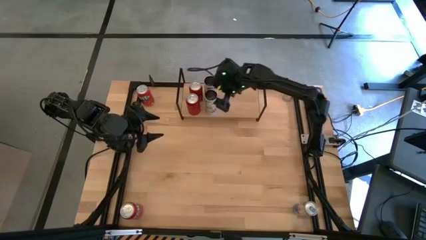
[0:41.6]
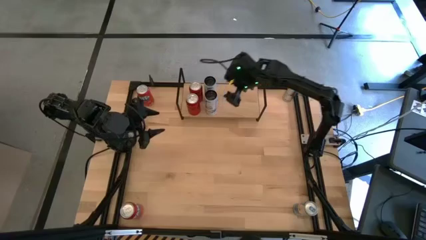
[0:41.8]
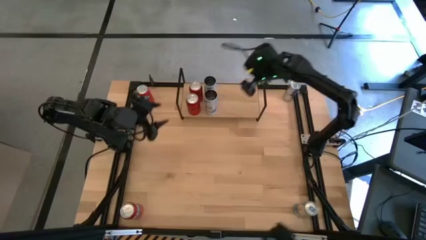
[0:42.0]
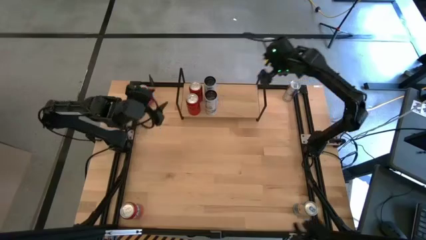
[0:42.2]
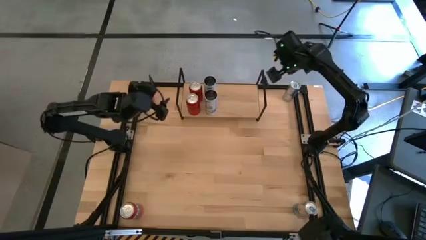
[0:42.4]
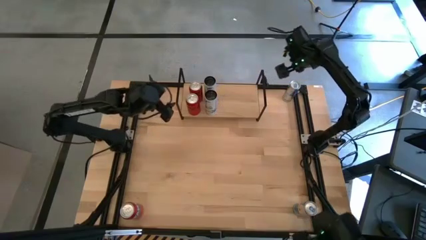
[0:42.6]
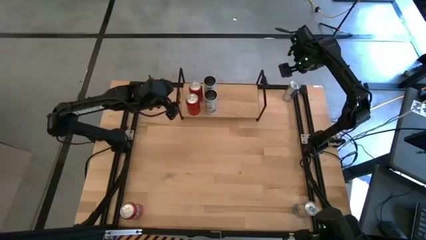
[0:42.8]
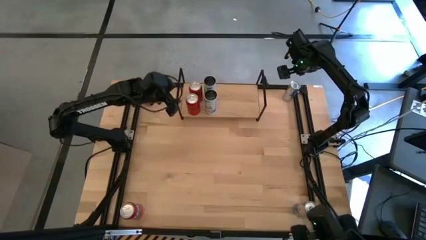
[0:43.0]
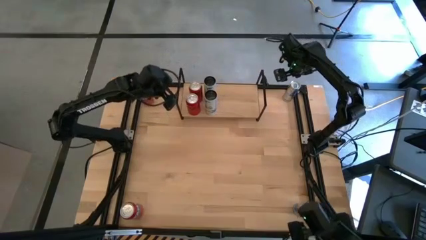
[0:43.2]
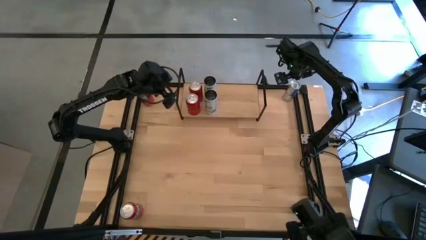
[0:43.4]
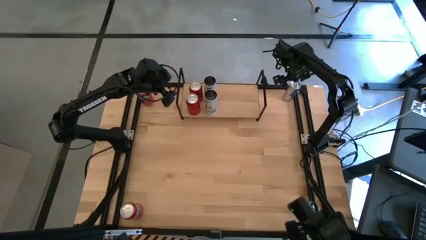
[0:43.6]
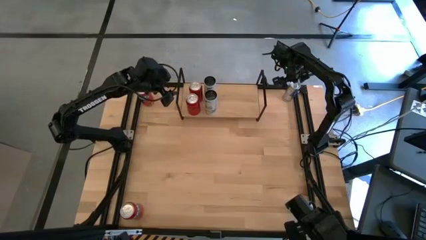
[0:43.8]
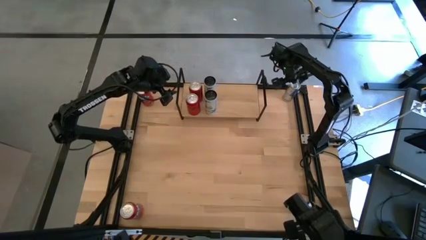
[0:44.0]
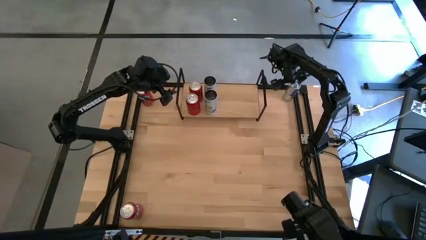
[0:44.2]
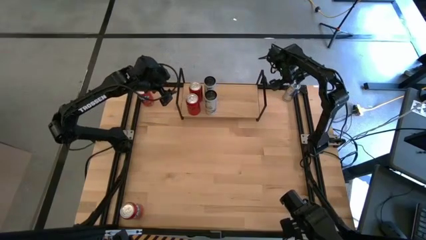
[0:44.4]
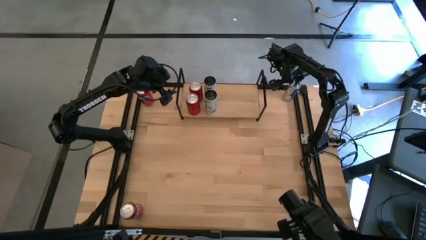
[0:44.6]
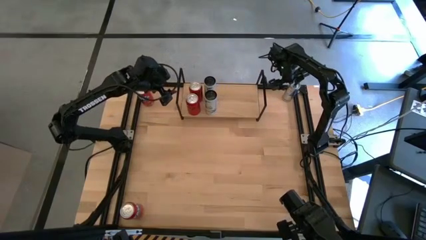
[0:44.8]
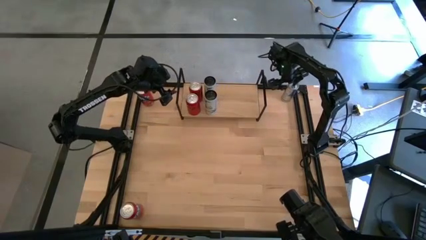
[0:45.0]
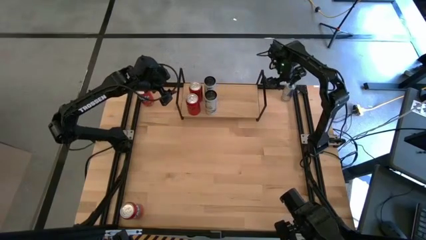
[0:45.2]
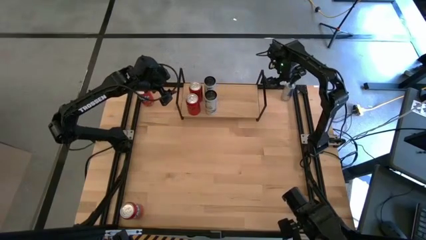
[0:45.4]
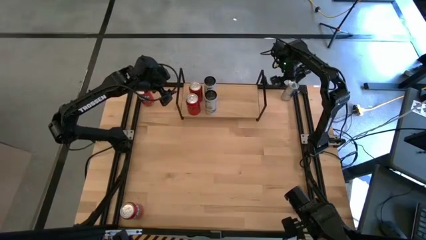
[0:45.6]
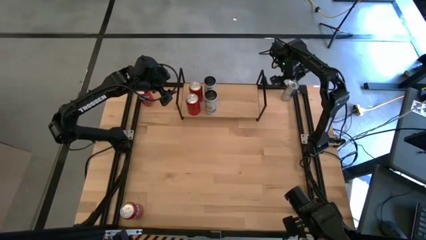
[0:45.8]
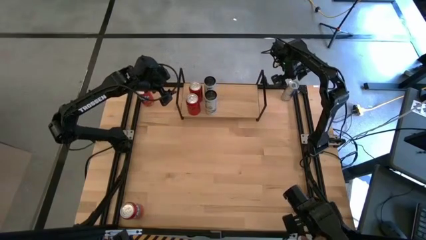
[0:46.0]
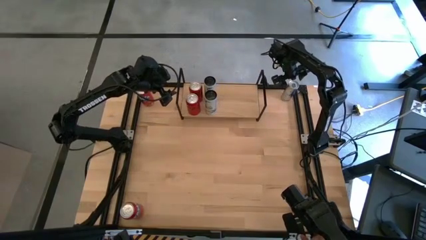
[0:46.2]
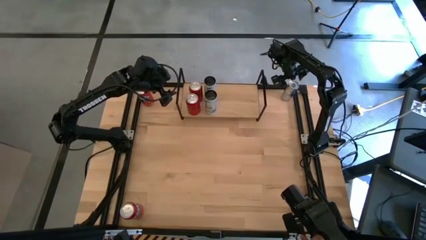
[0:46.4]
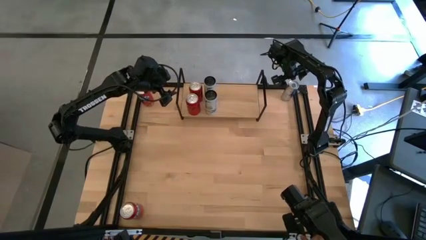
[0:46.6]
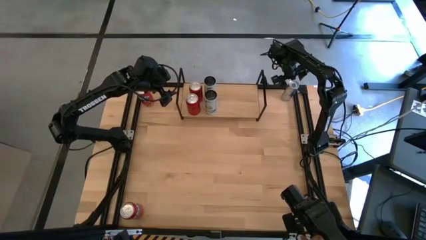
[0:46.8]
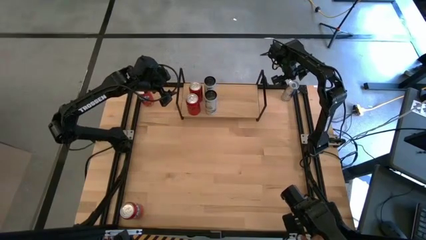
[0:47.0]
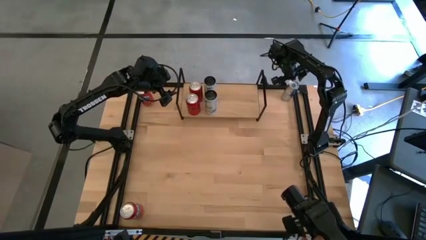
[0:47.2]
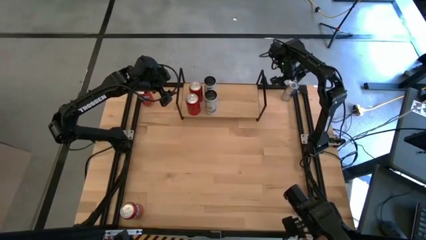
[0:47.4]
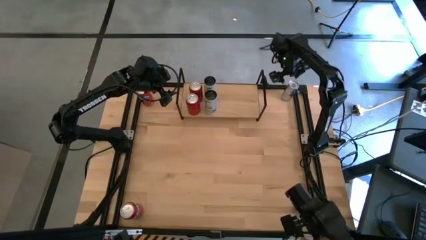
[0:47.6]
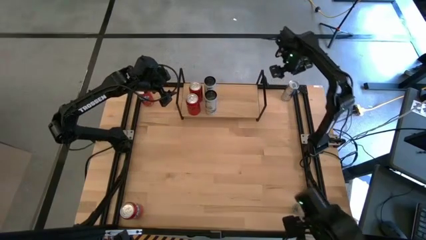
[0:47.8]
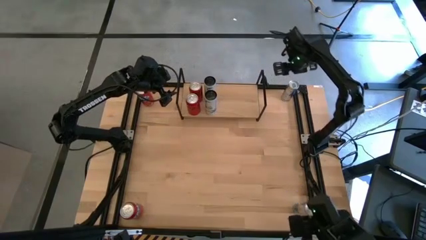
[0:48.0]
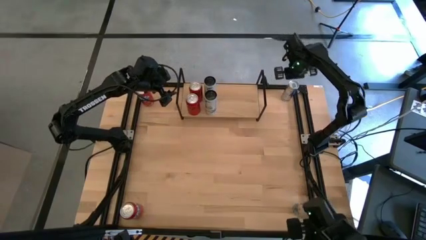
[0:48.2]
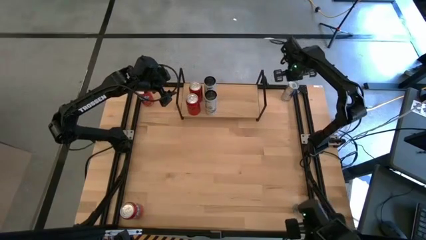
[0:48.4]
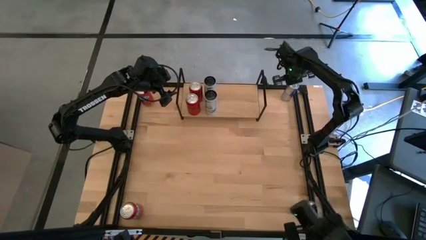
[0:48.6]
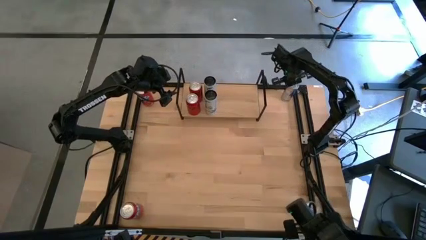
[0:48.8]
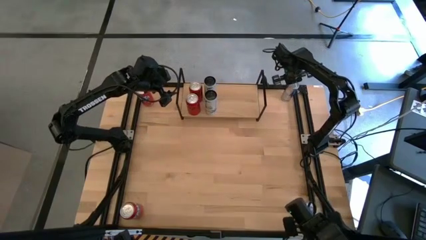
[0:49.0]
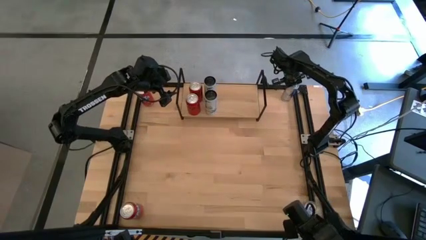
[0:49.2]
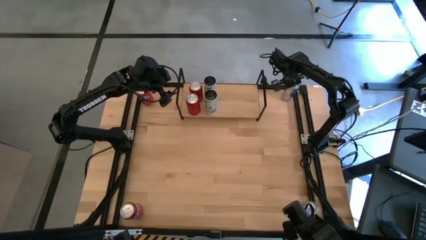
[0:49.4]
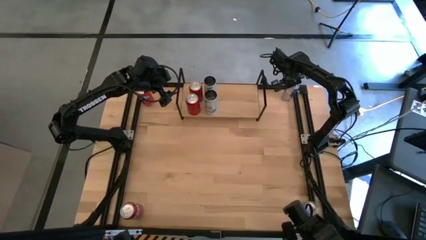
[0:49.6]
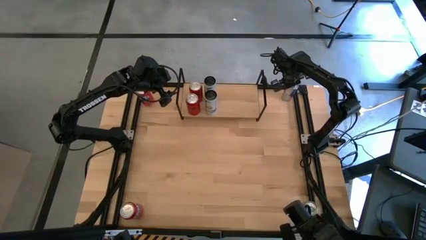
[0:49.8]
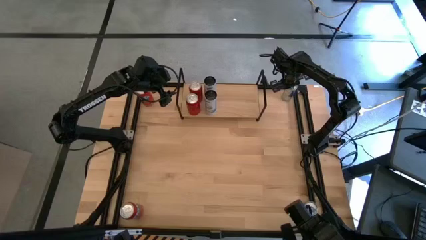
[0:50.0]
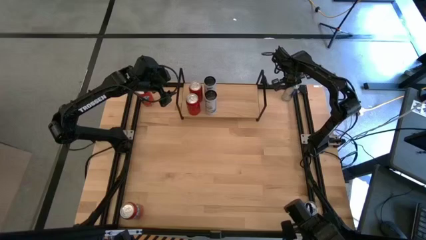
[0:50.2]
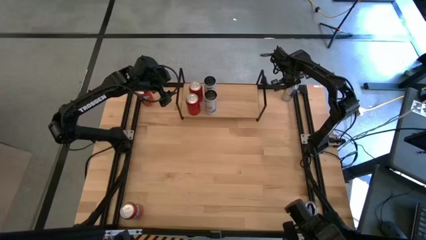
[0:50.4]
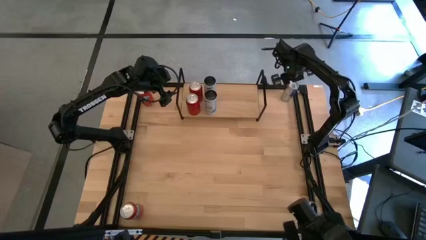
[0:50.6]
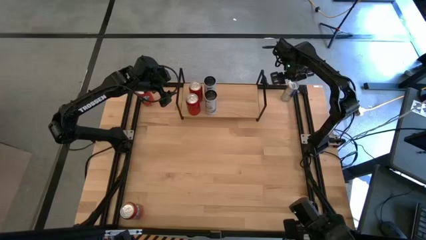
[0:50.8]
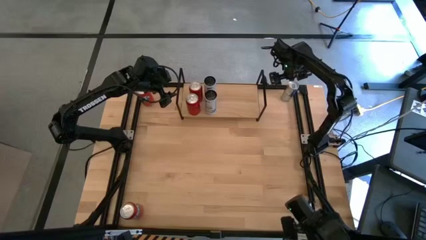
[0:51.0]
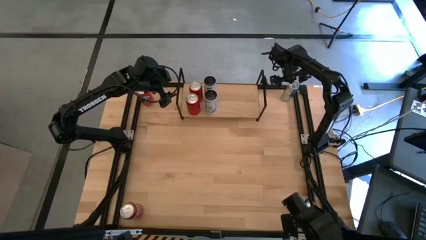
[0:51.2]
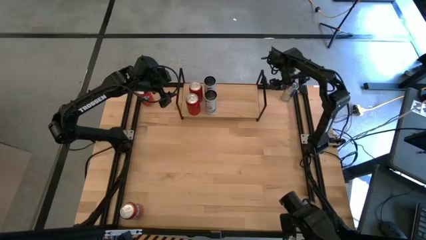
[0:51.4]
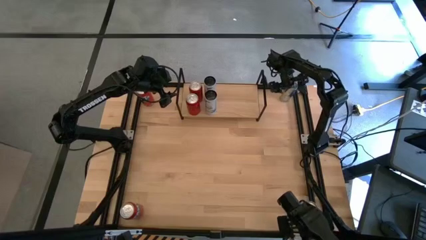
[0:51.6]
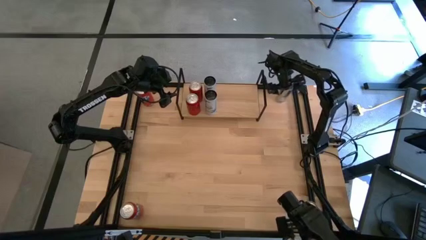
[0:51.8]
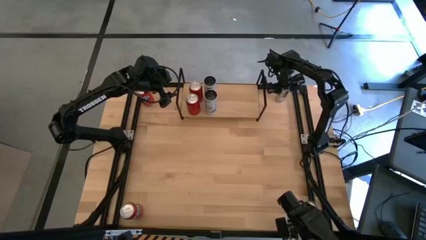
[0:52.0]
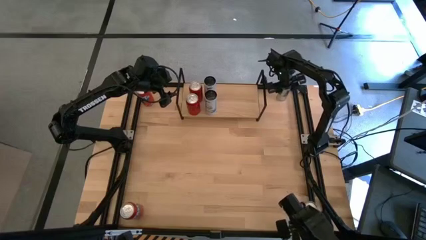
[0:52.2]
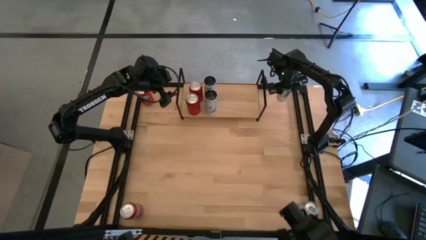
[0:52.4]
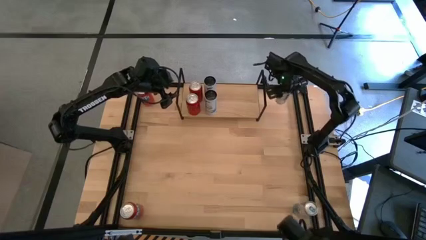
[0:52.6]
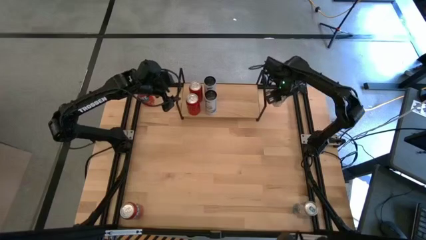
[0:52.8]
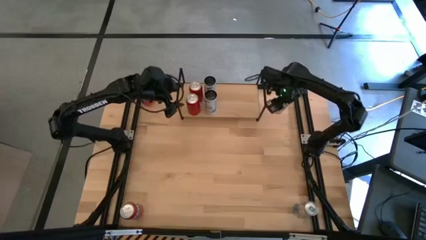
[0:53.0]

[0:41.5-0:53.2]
Task: Place canned beverage on shelf
Put the top blue soda can on the shelf

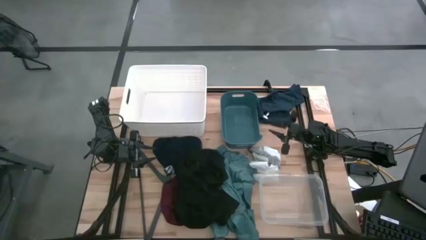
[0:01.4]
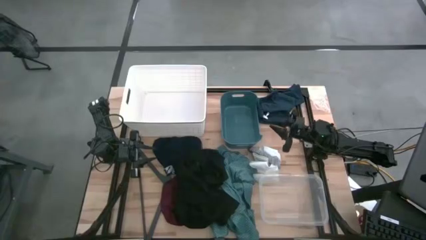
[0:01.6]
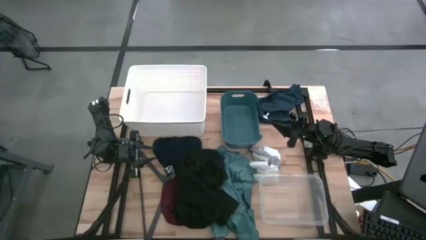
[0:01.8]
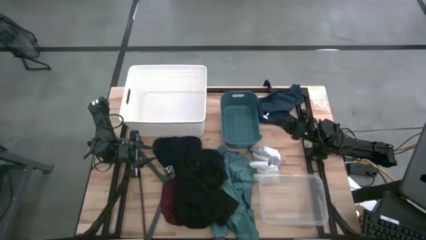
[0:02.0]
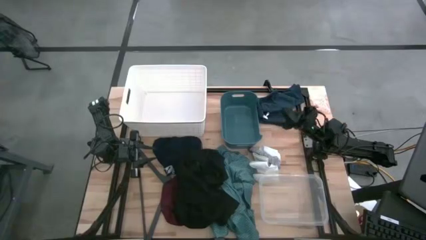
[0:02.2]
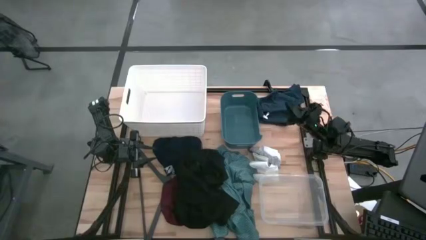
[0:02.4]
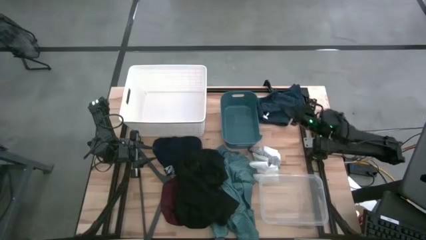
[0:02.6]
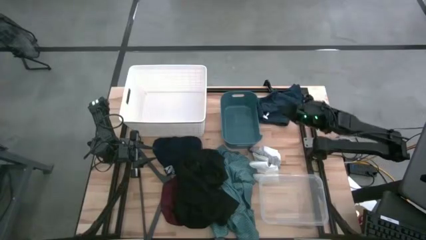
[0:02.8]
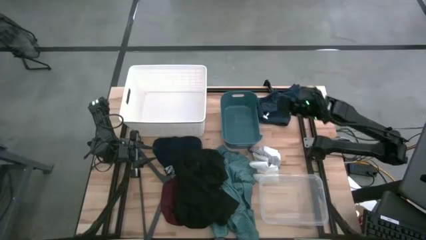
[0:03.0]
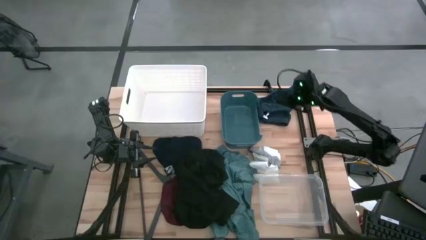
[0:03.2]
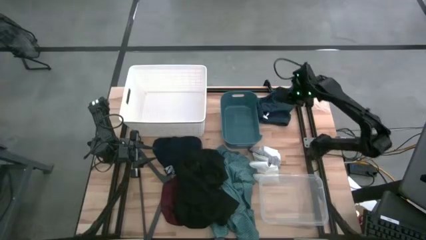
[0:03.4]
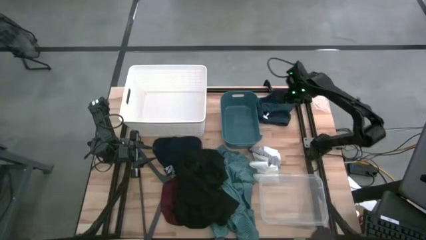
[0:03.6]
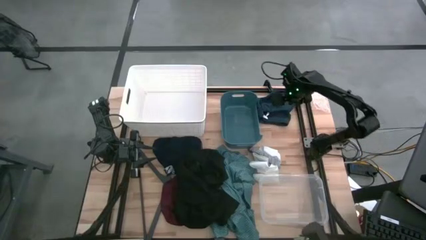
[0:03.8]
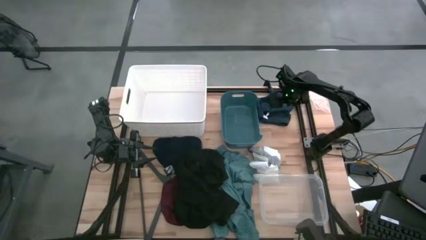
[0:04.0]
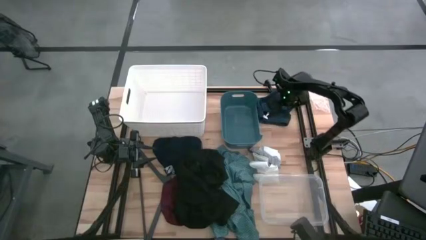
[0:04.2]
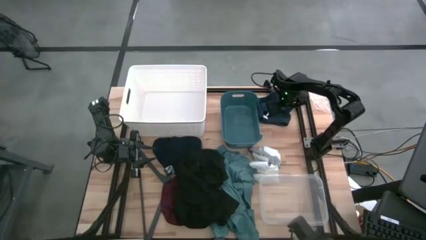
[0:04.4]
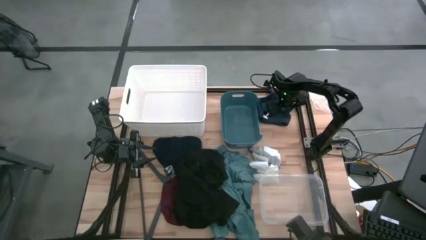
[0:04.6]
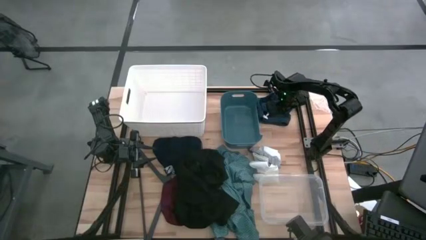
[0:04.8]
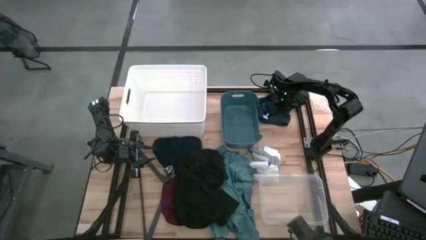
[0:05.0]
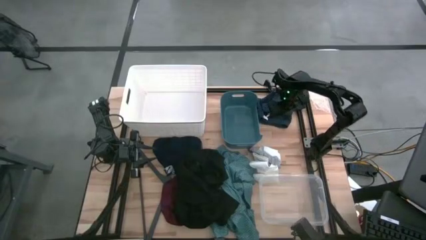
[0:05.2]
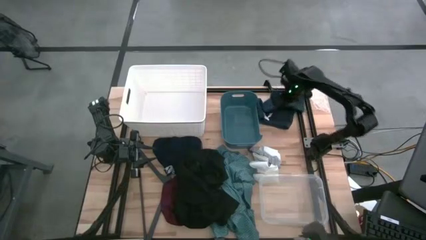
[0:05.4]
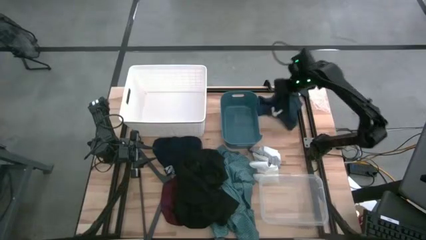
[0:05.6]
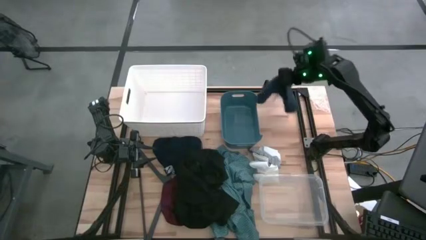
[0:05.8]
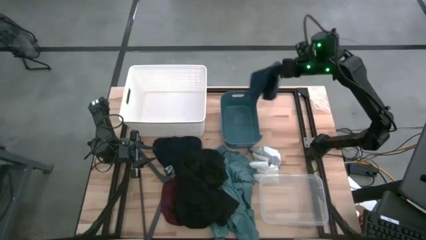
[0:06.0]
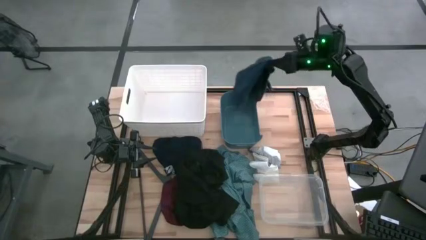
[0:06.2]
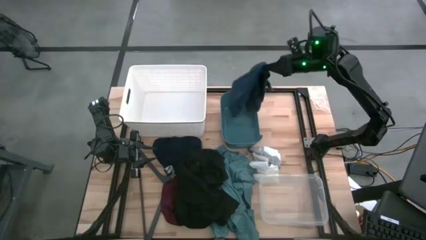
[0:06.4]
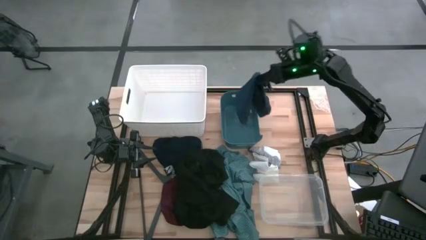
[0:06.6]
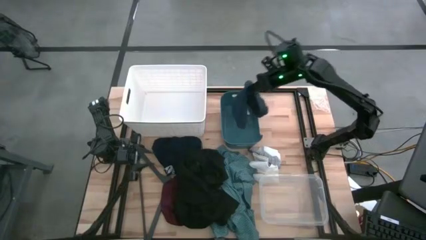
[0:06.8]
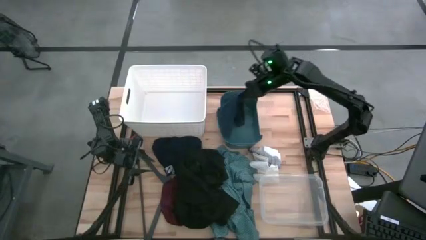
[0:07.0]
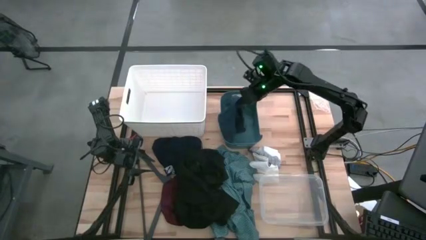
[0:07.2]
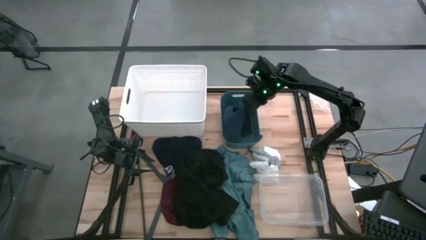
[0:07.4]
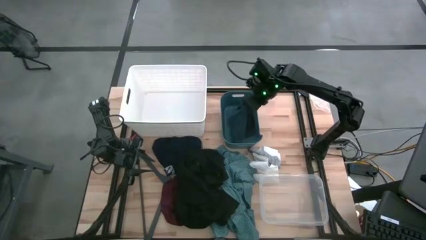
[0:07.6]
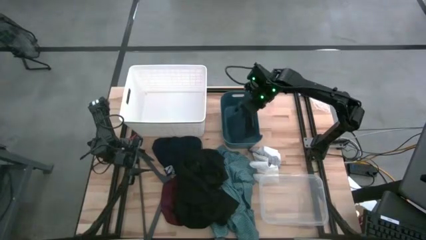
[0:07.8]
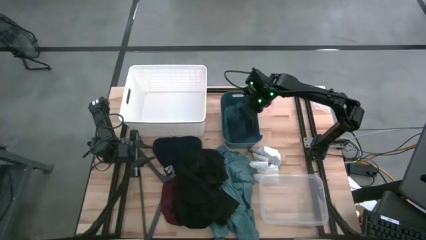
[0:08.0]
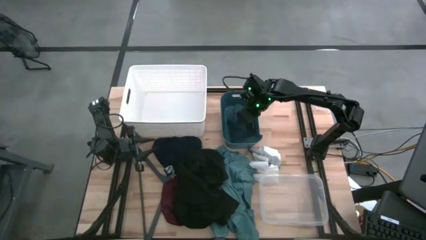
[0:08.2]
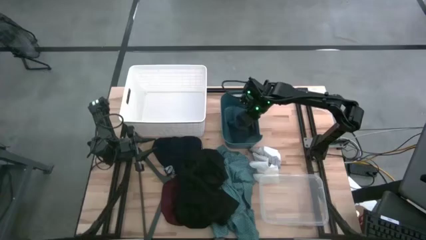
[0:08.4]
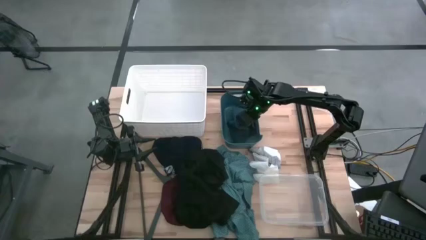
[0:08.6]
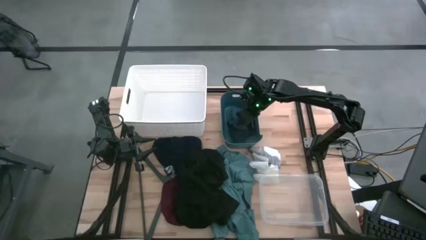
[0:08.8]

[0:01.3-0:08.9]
Task: Pick & Place Cloths
Put the gray shorts into the blue bin
